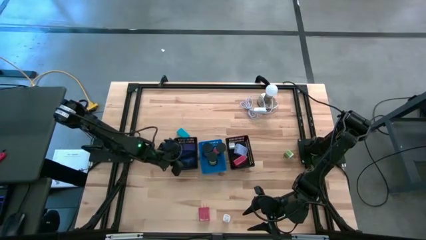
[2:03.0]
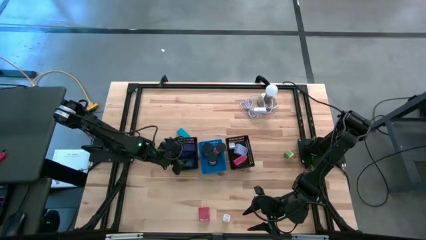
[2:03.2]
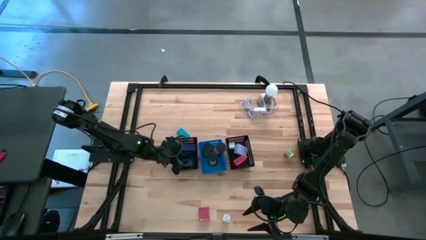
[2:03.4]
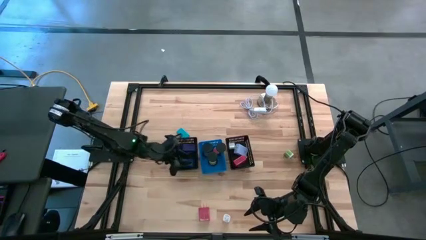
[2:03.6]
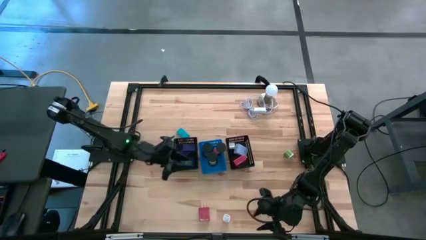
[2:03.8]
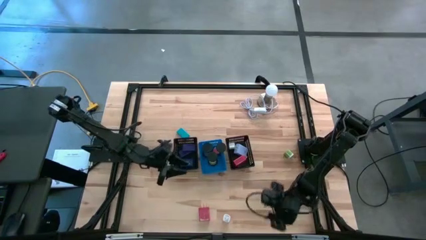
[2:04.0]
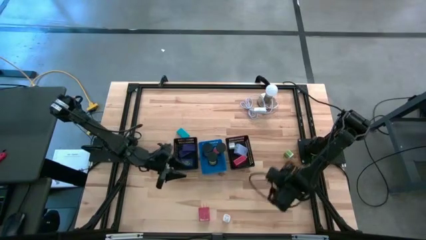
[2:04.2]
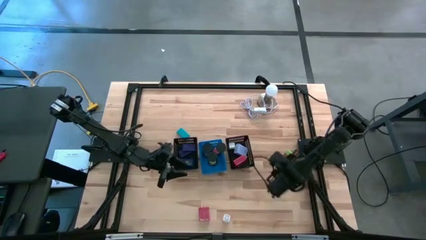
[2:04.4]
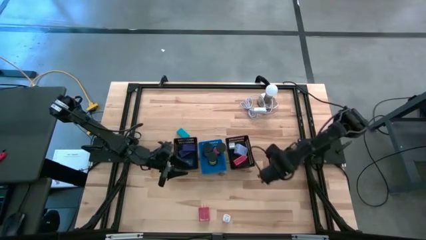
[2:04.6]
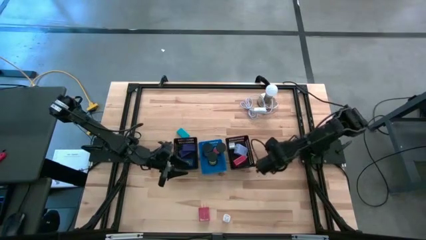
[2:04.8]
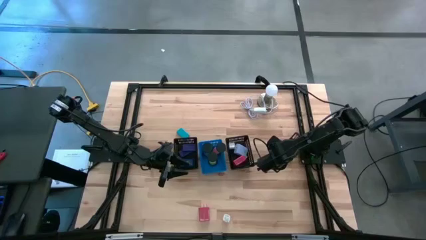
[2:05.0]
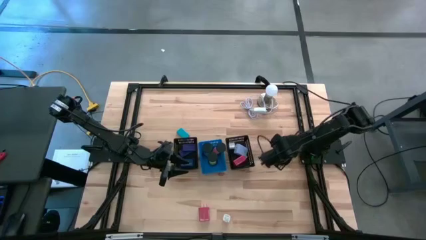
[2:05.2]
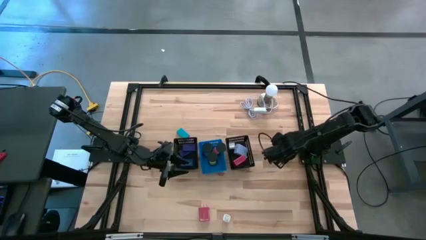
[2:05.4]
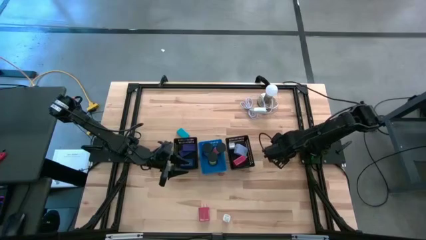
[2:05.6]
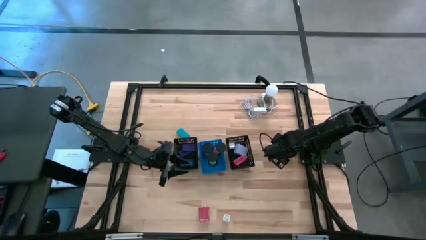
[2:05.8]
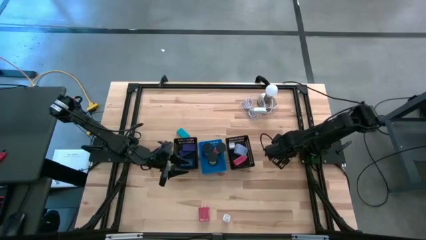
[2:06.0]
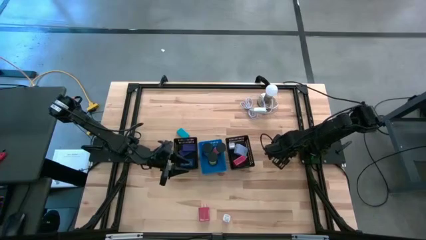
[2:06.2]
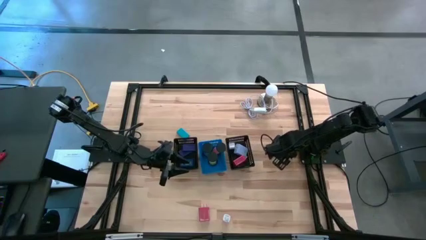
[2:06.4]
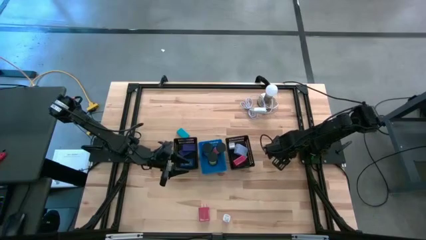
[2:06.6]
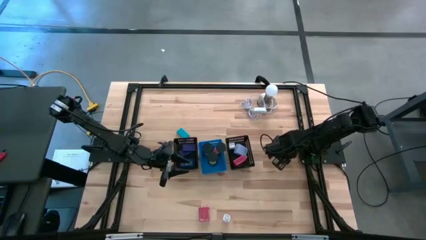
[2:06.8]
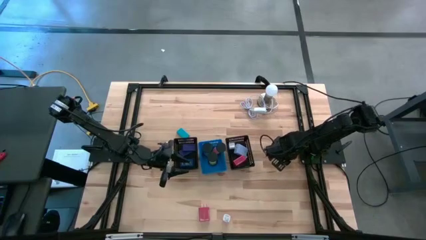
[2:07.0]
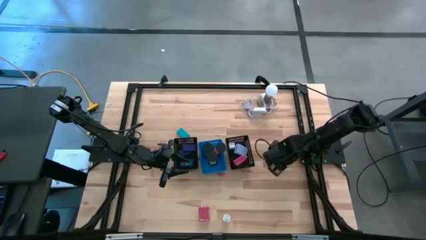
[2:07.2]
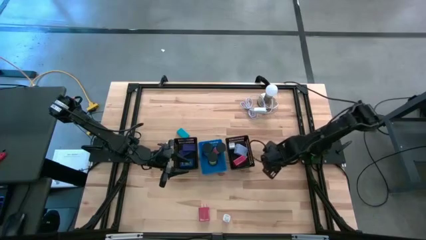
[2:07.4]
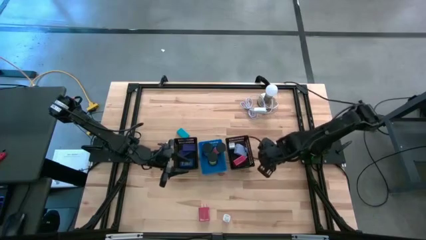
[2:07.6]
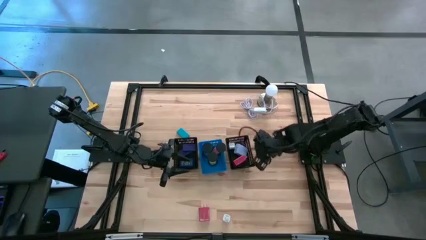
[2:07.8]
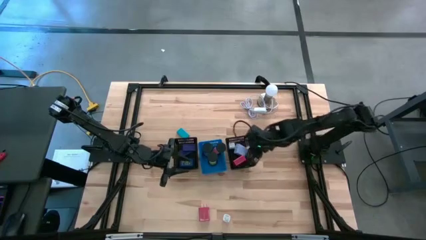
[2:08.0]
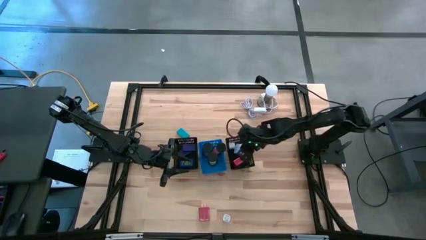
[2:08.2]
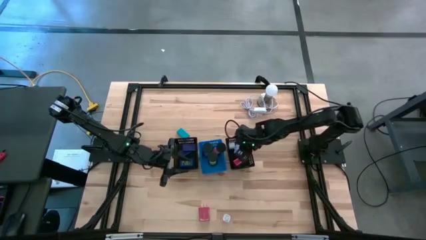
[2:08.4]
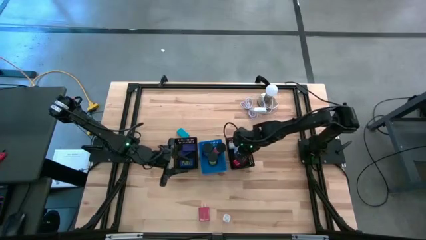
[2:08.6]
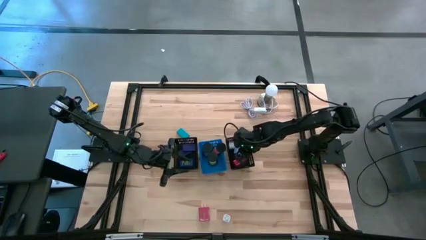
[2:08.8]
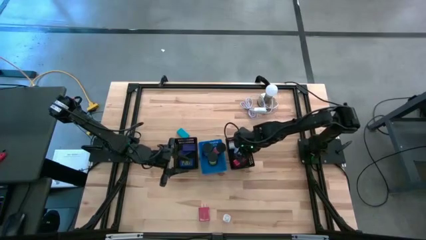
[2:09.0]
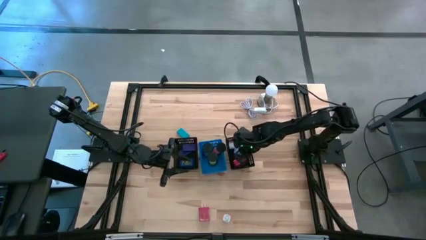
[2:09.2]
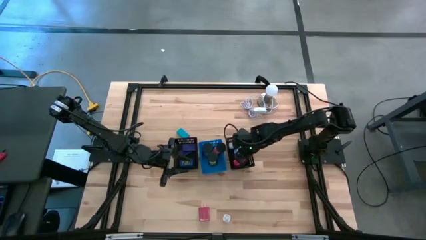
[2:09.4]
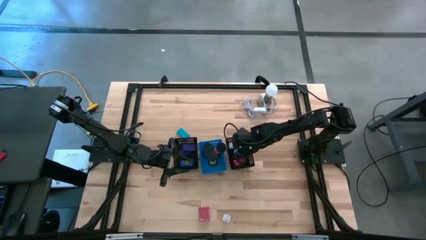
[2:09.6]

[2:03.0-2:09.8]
Task: Pick & Place Office items
Put the green charger adapter into the right black bin

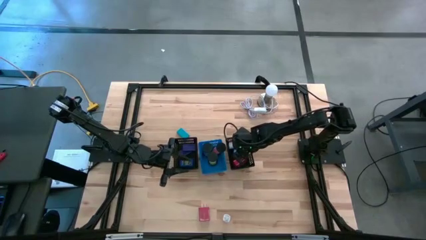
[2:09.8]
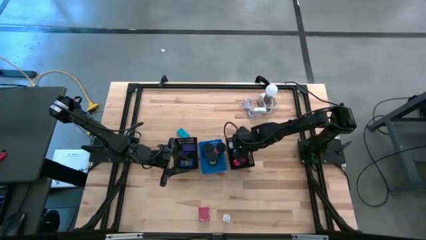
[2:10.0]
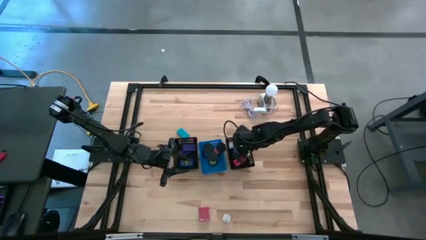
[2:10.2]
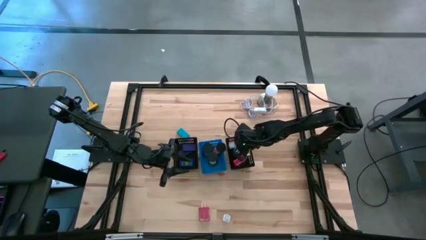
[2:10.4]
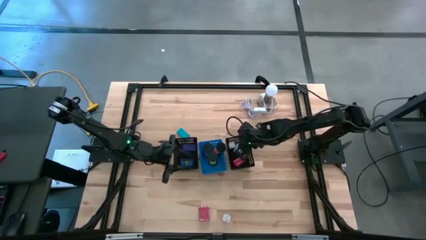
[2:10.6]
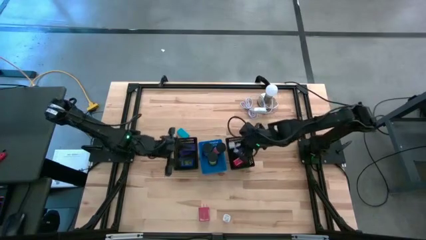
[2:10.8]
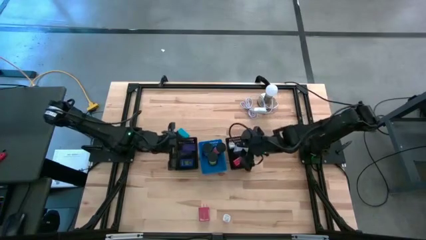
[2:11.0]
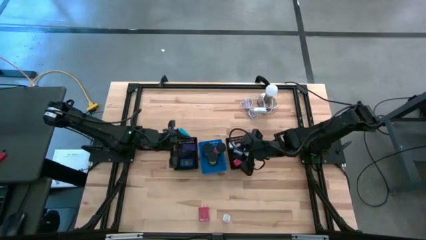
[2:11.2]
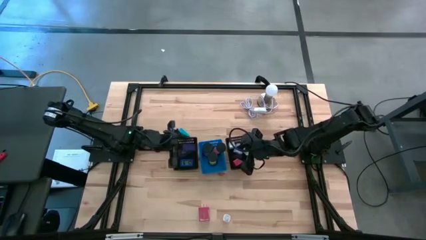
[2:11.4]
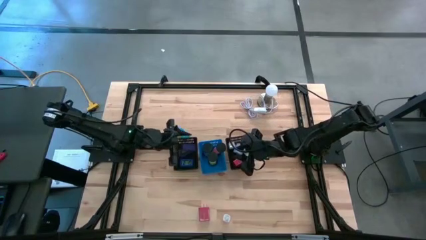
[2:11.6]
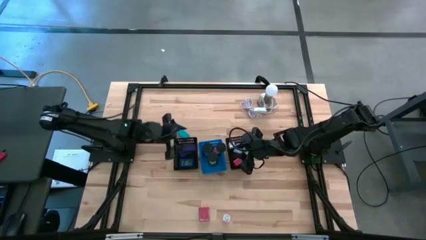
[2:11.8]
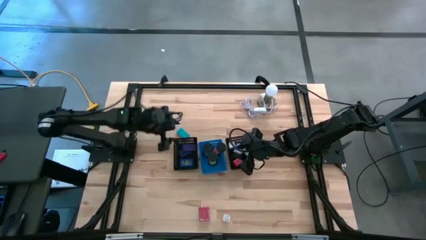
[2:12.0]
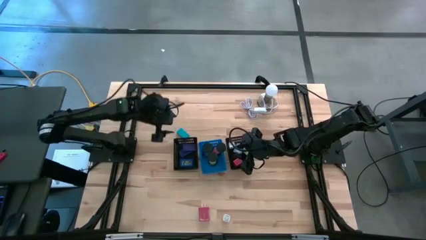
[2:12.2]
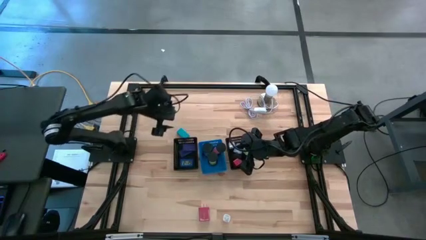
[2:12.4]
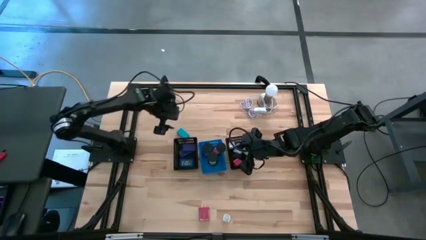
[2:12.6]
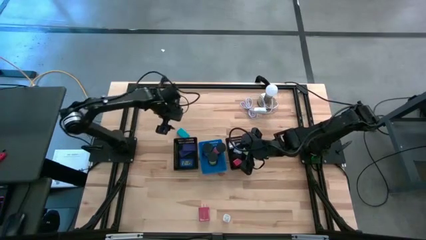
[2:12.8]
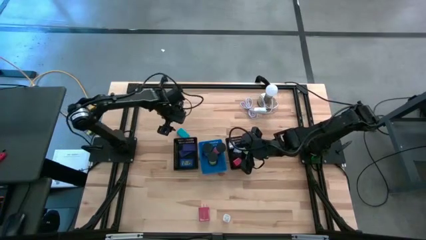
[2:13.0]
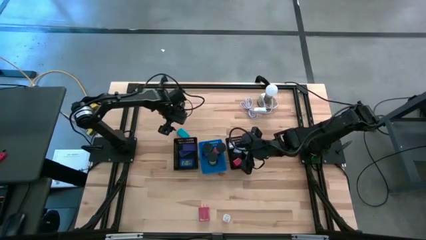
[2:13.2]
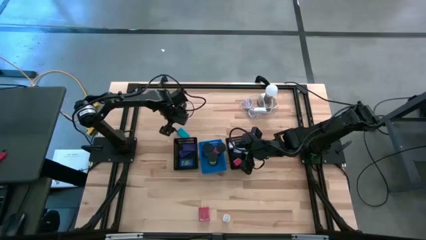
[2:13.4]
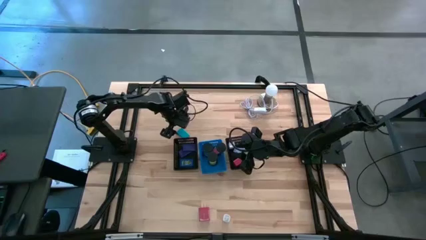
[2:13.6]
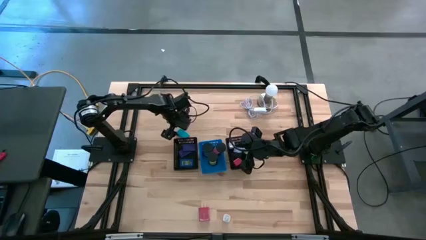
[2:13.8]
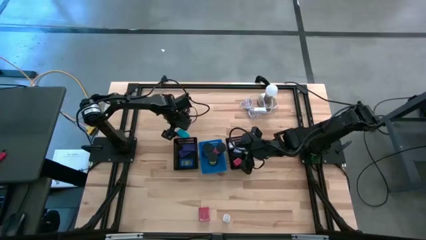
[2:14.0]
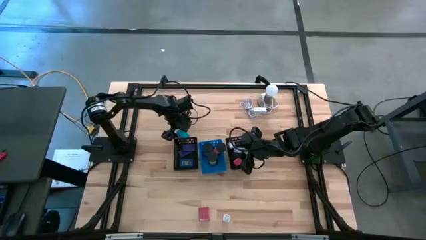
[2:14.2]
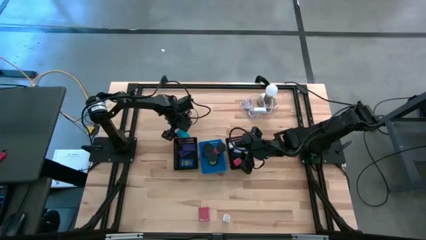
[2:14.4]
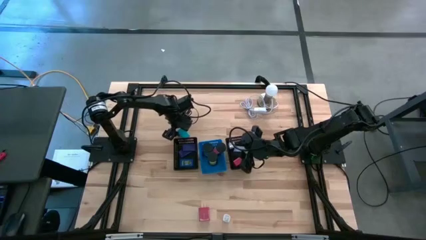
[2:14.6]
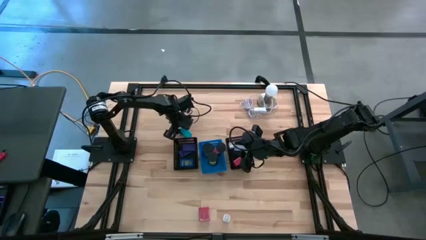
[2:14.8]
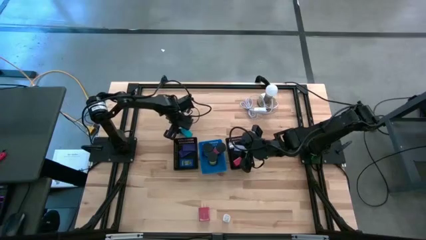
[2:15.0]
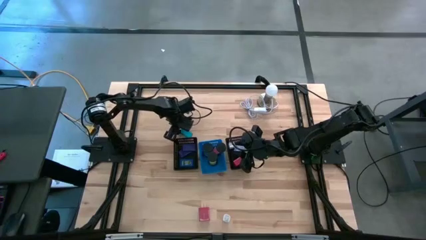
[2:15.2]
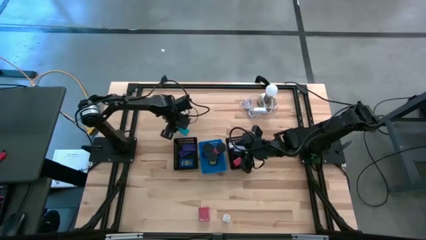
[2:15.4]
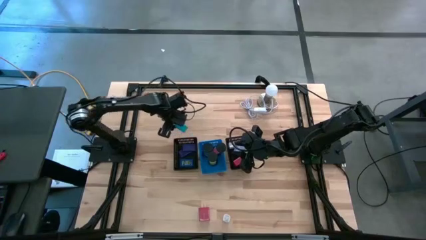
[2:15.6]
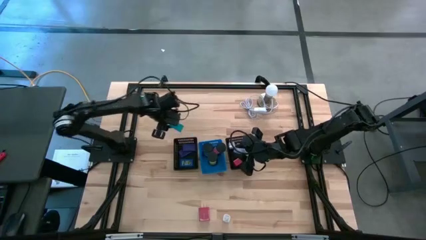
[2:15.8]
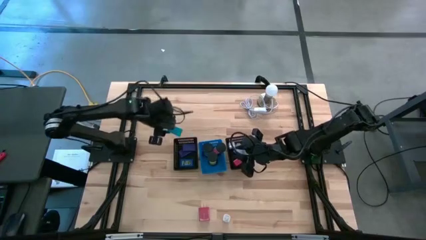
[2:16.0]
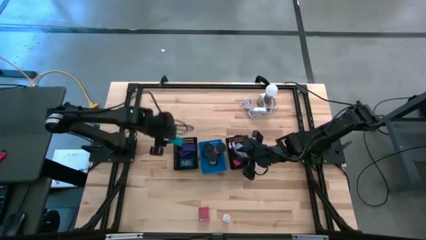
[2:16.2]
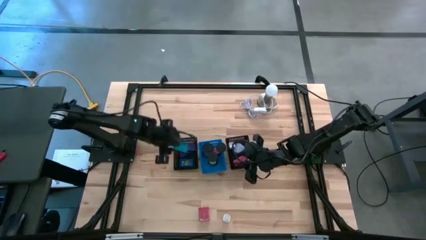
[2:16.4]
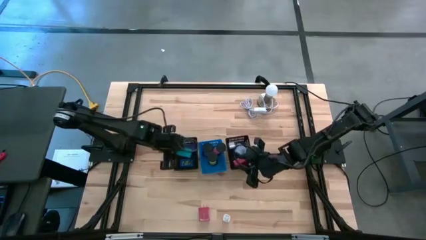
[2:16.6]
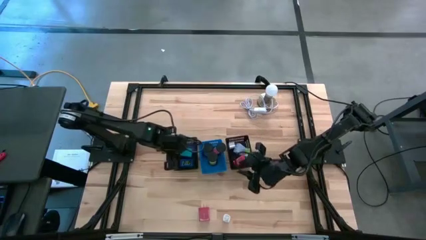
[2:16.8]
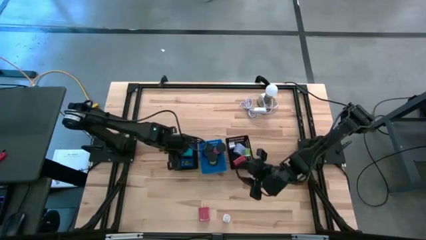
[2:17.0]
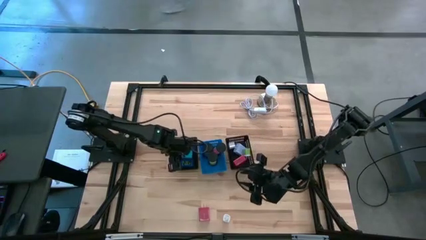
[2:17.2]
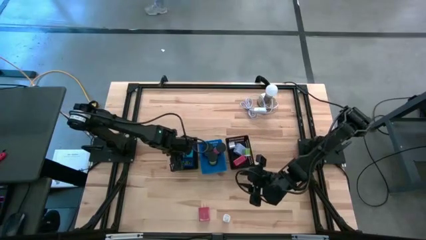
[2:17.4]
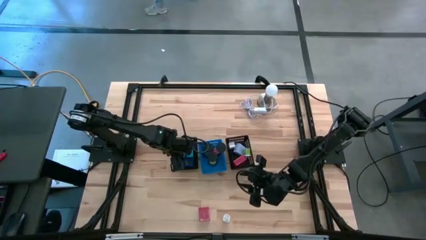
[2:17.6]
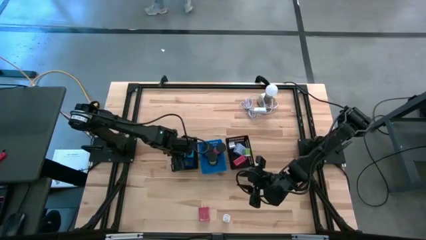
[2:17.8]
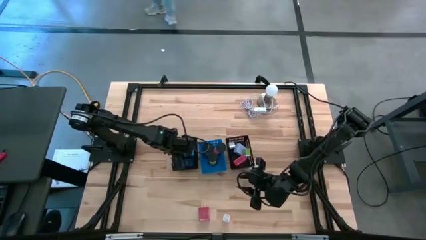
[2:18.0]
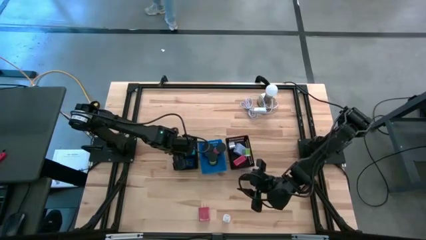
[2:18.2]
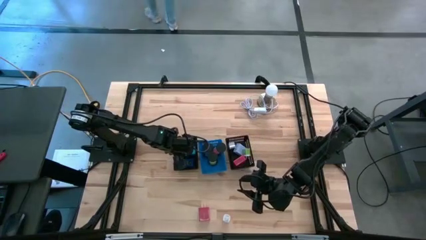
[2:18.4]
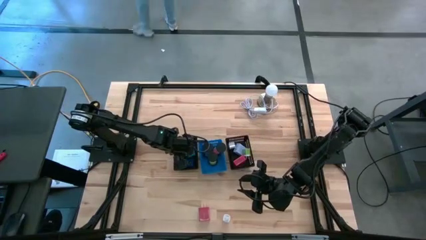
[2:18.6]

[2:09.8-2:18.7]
Put the light blue digital clock into the left black bin
